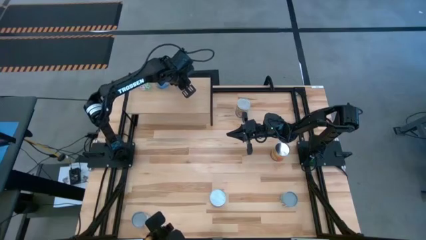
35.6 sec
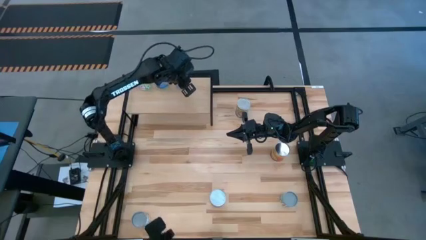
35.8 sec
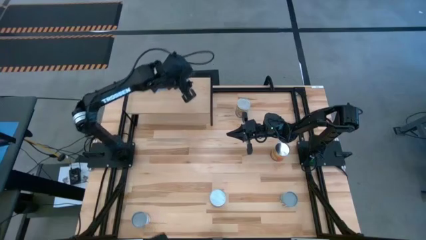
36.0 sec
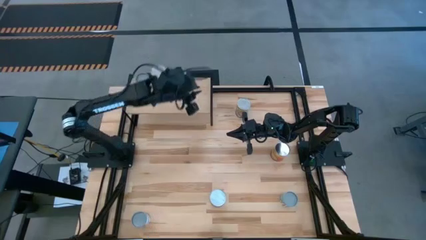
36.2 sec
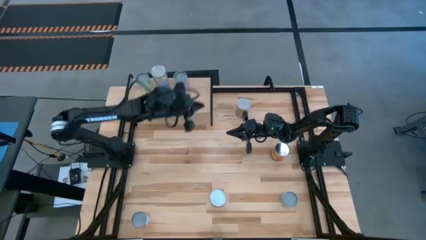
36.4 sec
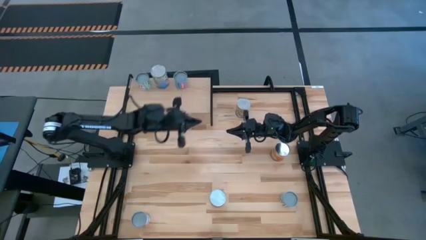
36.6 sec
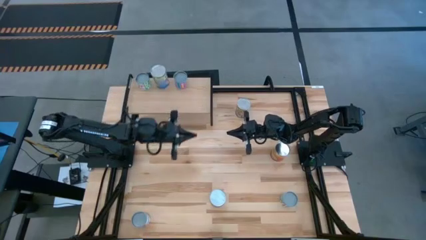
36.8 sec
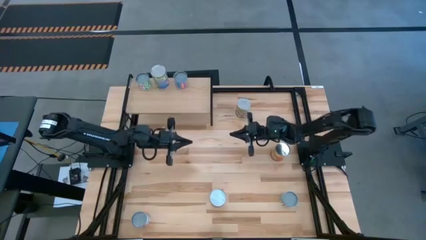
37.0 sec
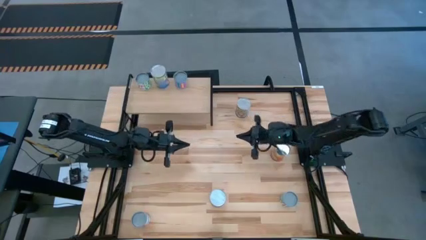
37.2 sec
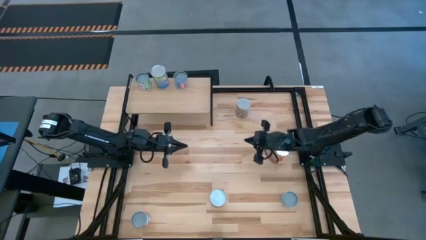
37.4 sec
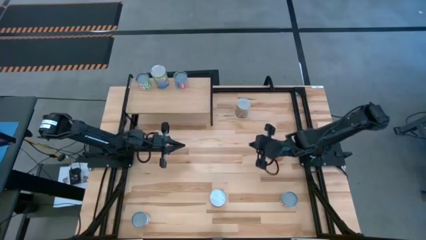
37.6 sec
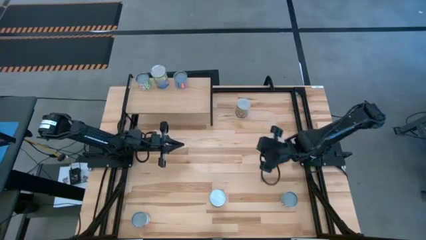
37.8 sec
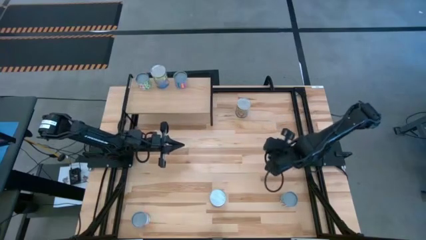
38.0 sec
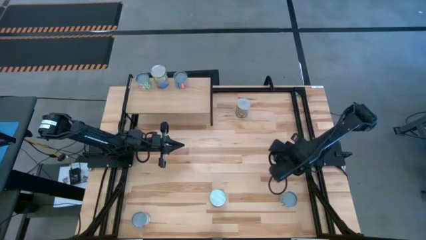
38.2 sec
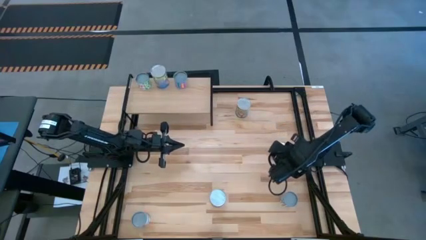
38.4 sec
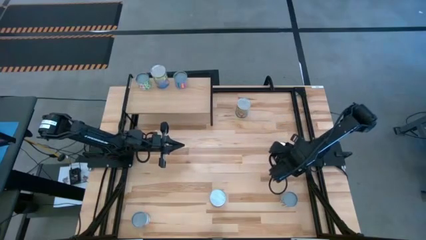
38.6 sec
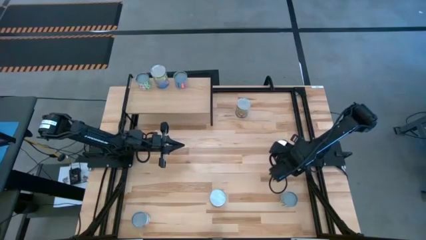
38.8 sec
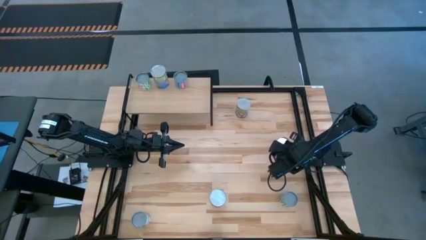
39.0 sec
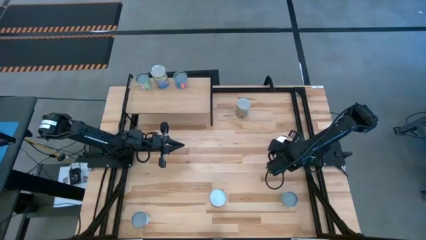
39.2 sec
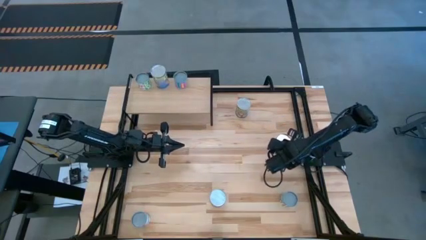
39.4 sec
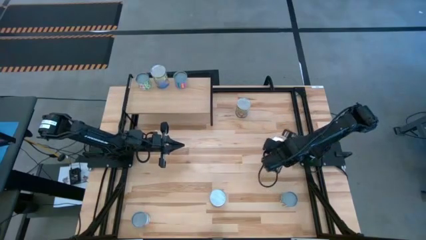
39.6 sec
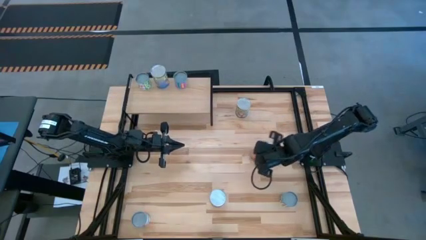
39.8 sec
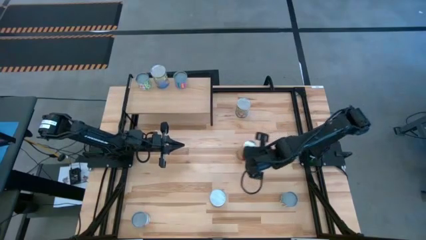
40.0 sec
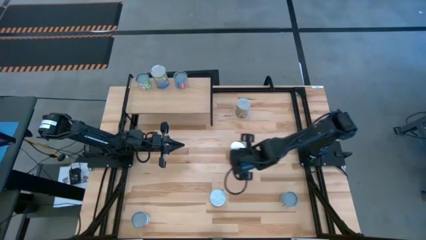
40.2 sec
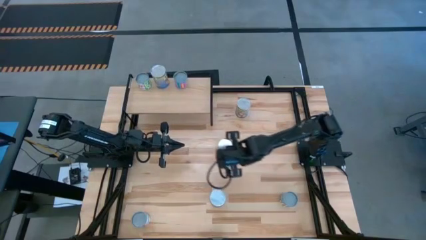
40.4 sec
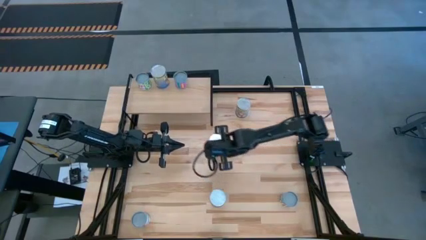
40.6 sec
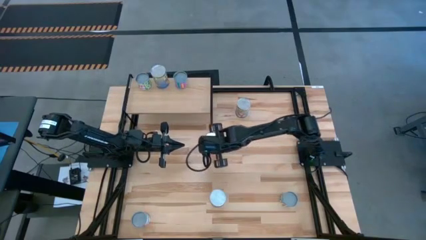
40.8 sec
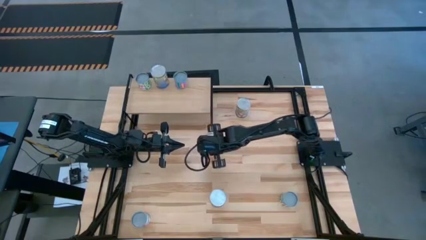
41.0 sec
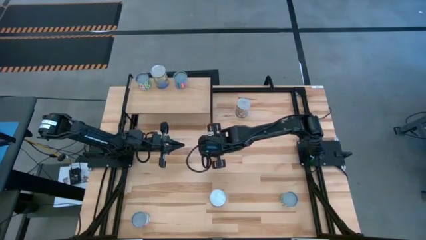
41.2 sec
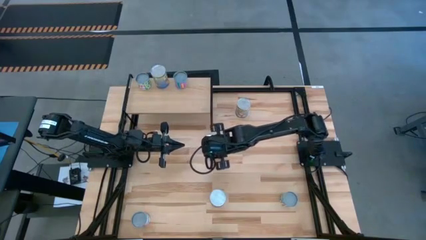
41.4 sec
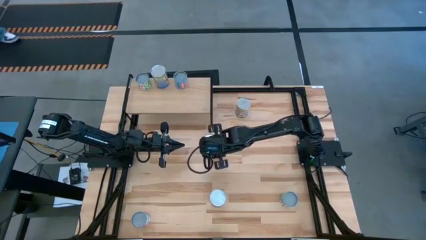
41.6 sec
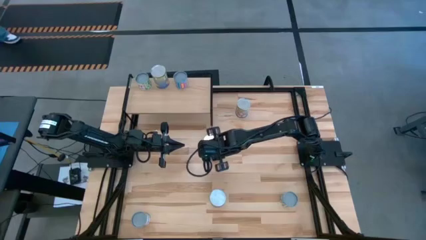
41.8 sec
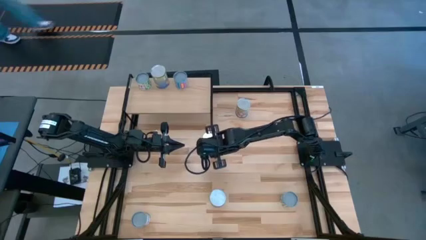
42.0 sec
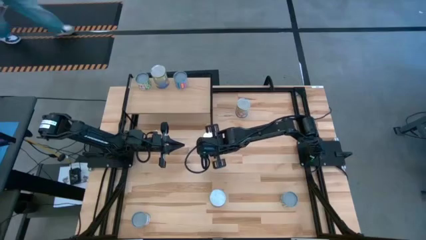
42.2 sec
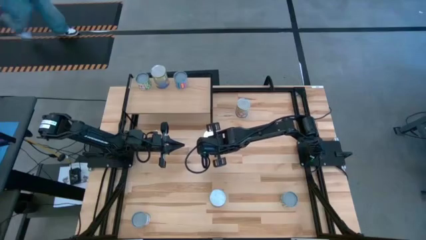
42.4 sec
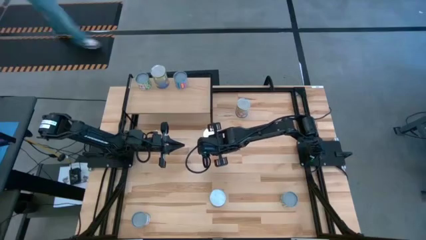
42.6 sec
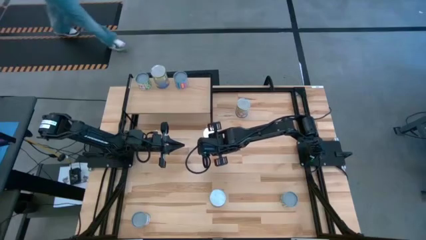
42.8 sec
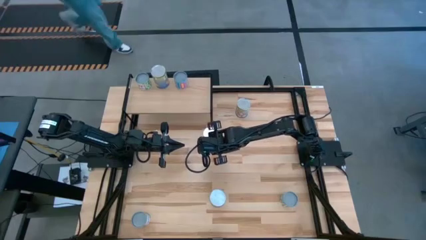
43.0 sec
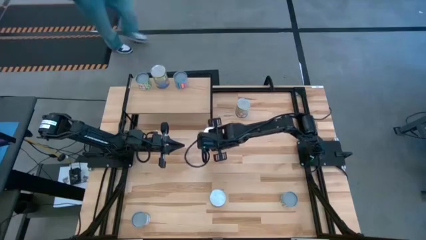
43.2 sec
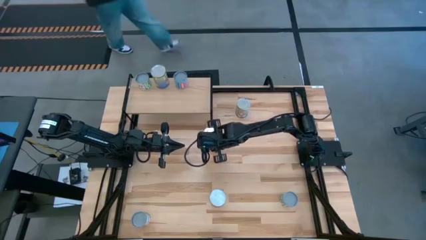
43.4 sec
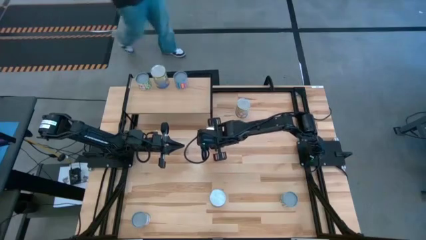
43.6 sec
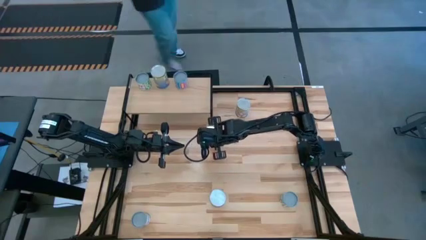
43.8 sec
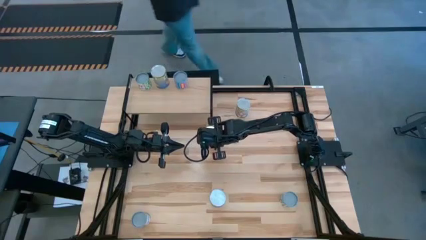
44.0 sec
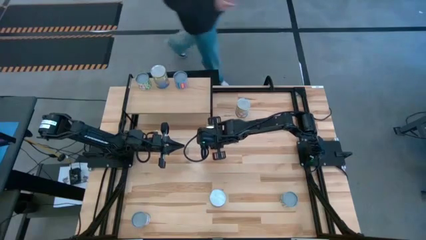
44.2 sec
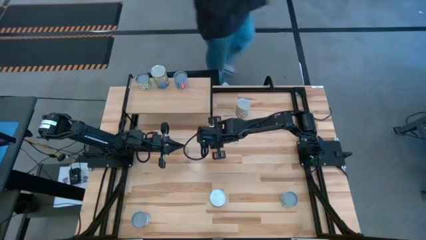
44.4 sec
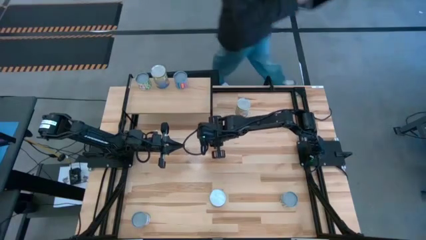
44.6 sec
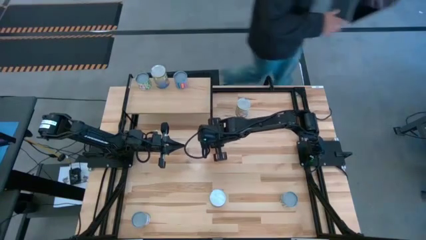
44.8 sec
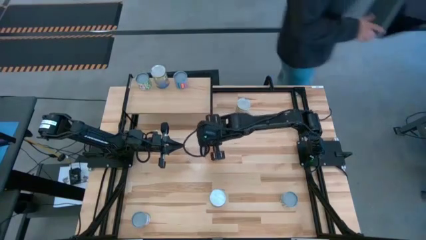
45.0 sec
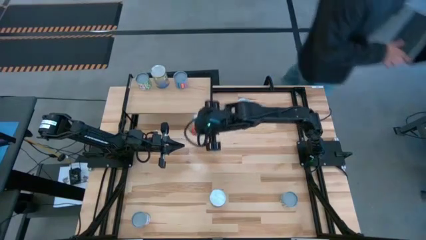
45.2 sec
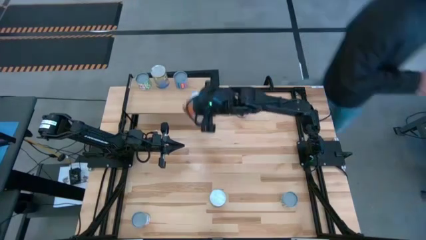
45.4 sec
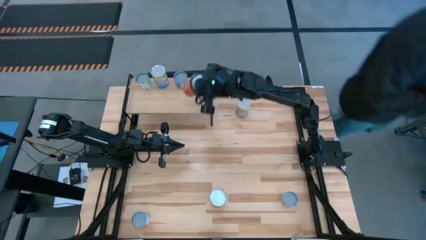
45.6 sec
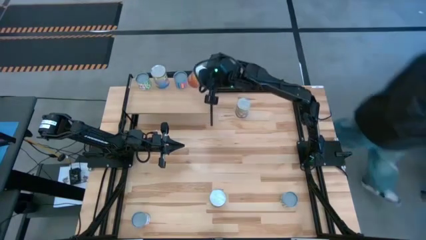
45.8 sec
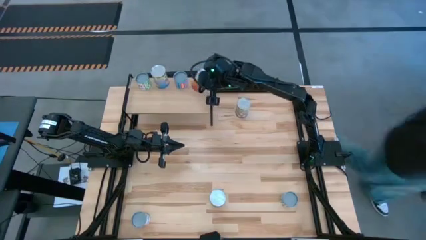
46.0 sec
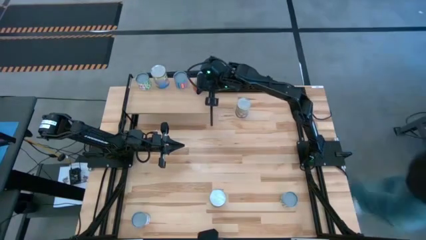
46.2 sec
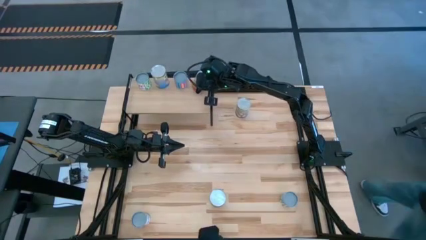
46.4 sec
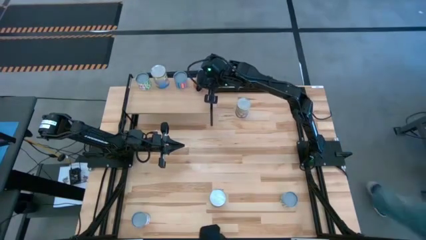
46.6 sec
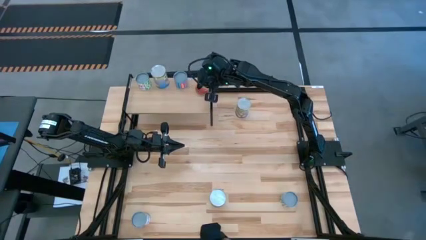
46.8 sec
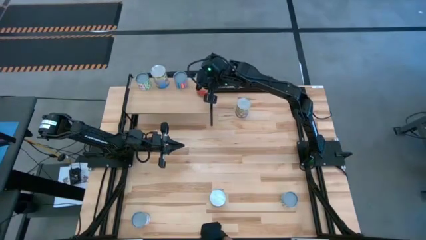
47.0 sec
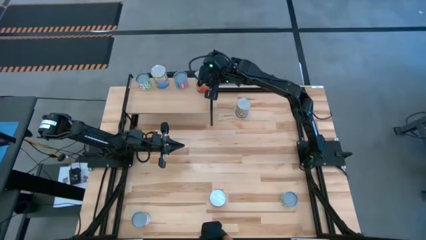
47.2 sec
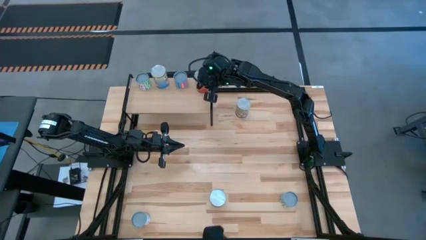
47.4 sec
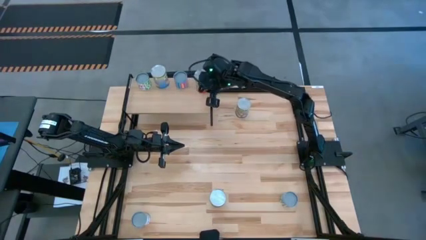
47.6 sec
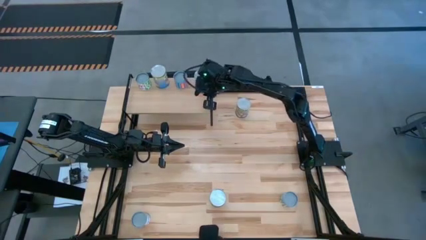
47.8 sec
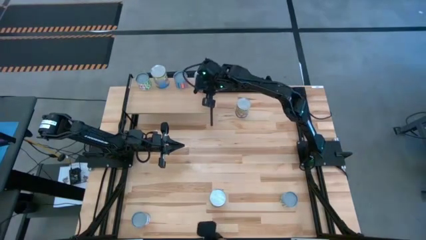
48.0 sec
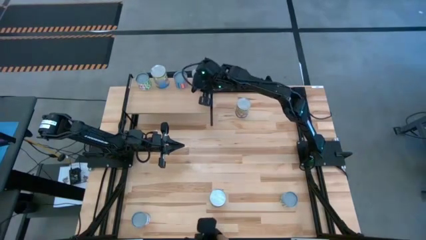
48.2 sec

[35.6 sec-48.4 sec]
Task: Pick and place cans onto a shelf
Put the right orange can on the shelf
